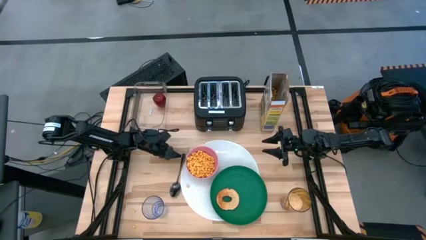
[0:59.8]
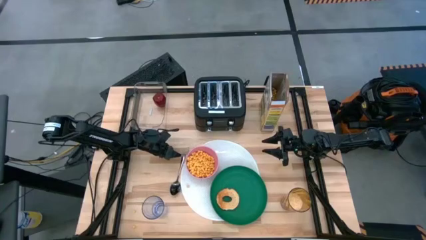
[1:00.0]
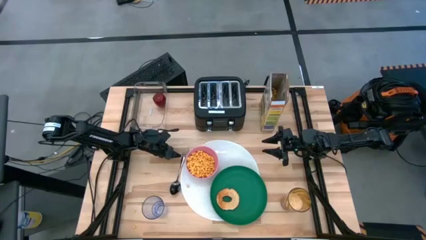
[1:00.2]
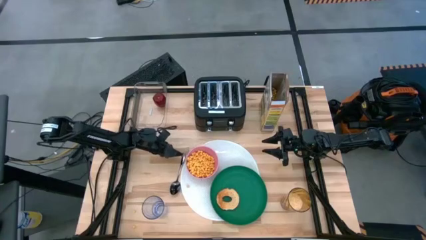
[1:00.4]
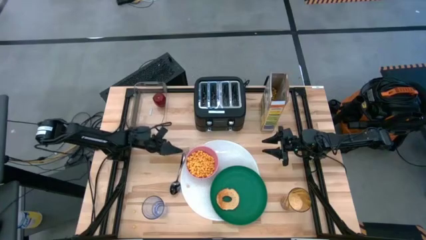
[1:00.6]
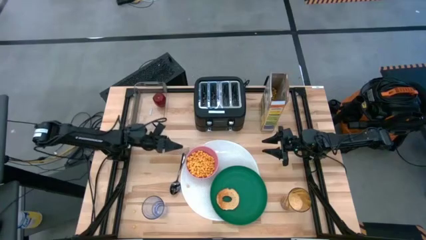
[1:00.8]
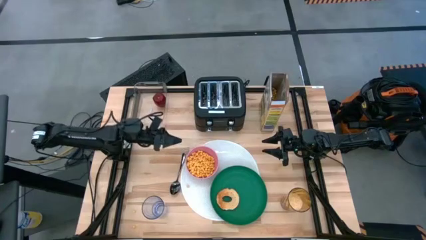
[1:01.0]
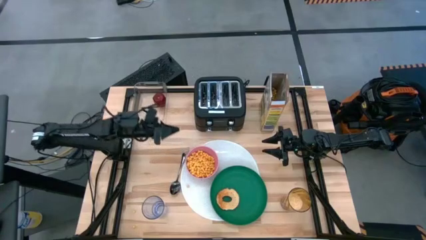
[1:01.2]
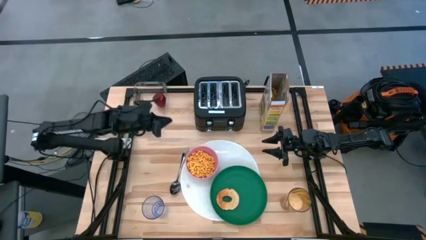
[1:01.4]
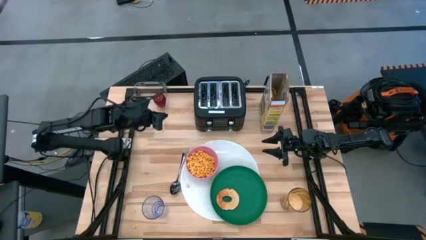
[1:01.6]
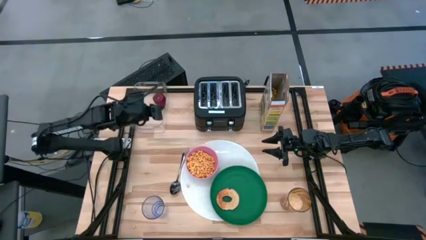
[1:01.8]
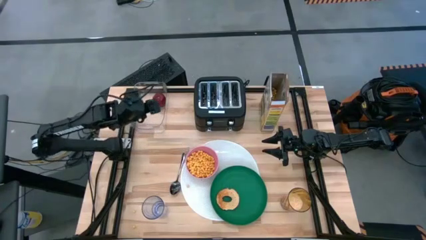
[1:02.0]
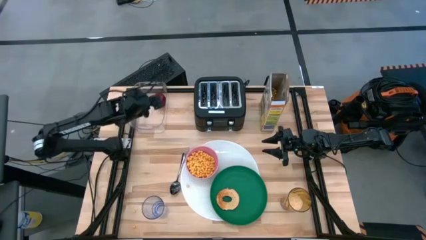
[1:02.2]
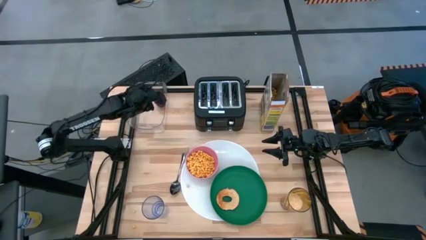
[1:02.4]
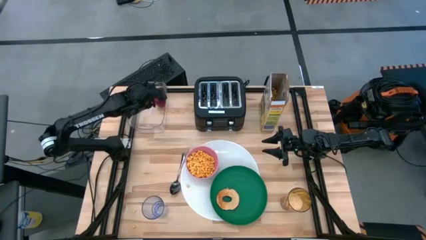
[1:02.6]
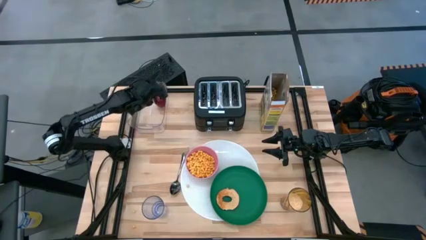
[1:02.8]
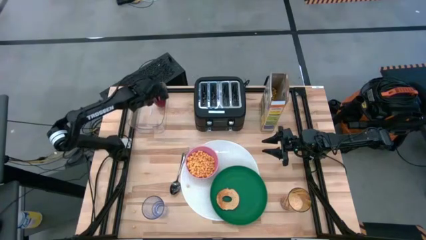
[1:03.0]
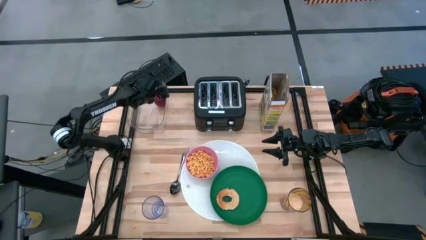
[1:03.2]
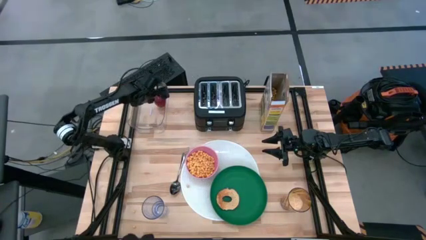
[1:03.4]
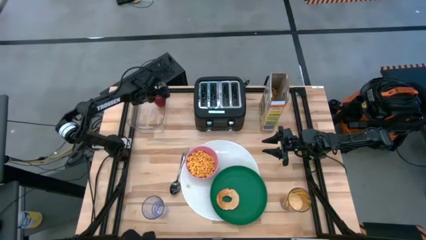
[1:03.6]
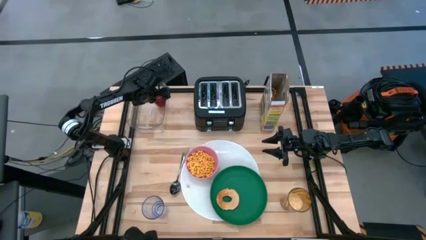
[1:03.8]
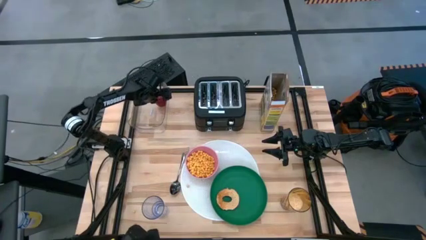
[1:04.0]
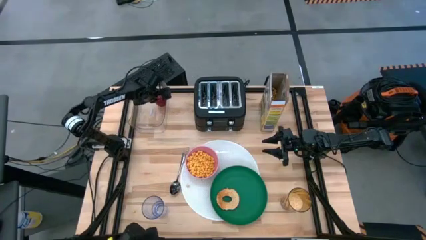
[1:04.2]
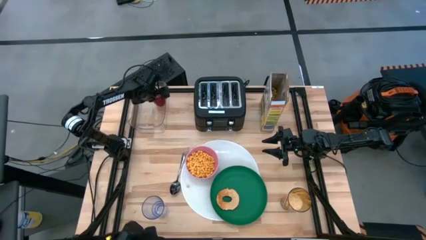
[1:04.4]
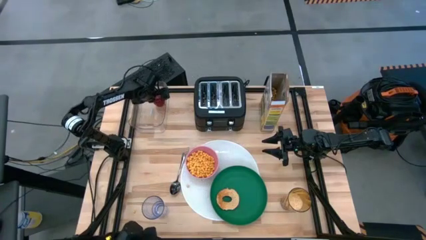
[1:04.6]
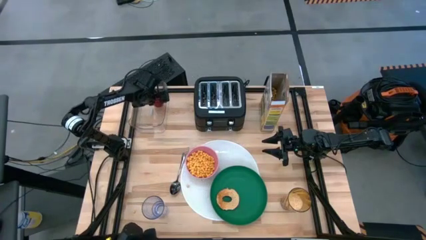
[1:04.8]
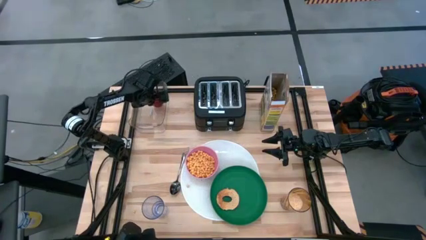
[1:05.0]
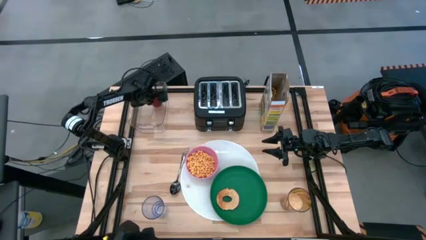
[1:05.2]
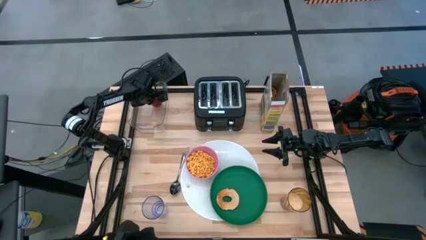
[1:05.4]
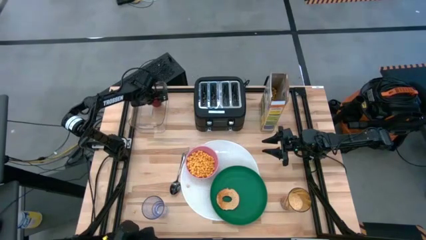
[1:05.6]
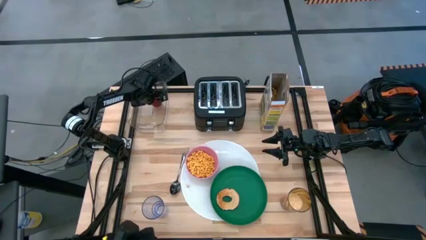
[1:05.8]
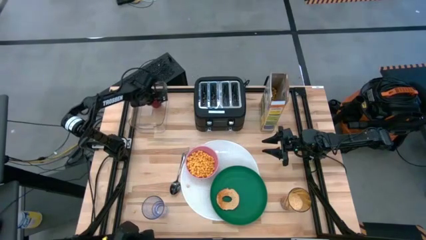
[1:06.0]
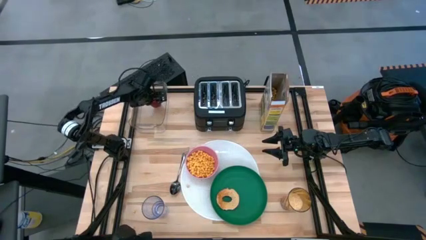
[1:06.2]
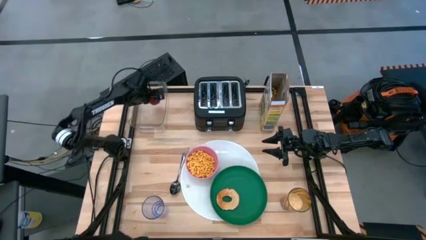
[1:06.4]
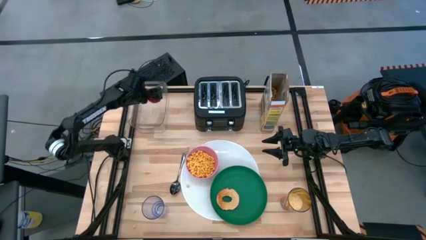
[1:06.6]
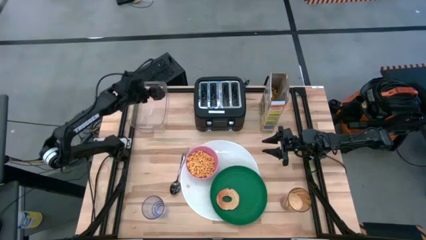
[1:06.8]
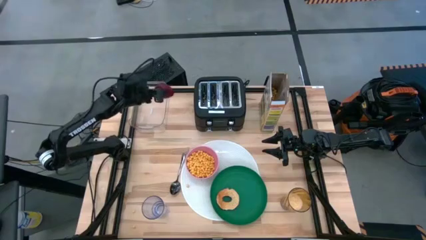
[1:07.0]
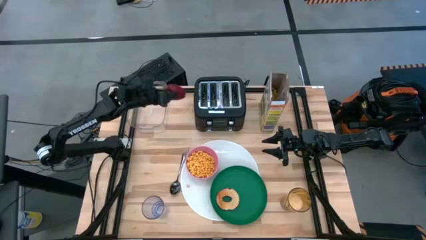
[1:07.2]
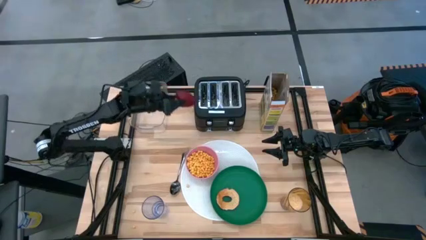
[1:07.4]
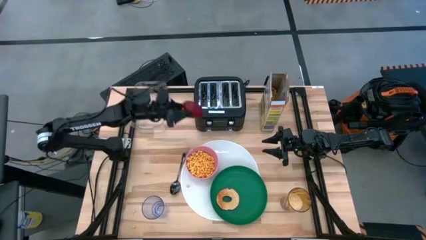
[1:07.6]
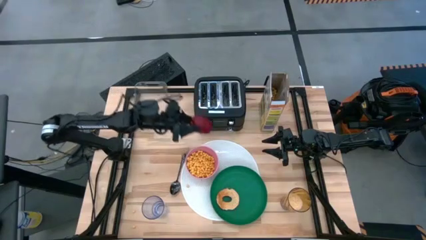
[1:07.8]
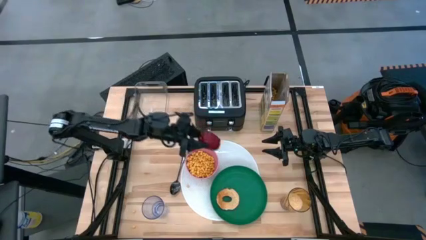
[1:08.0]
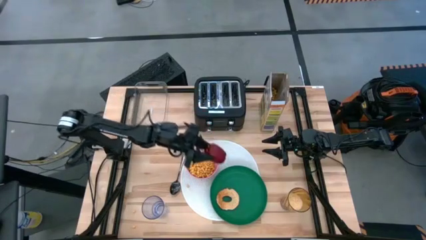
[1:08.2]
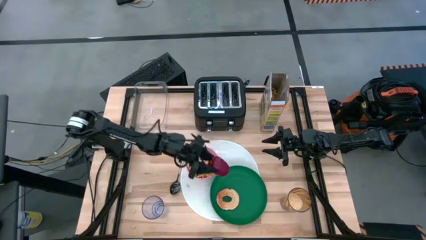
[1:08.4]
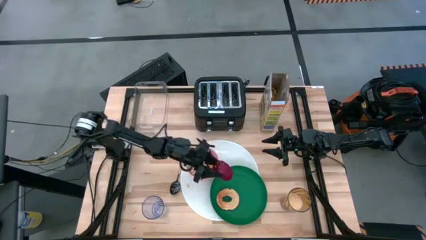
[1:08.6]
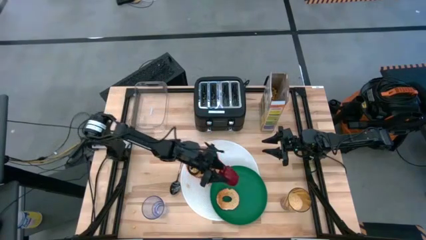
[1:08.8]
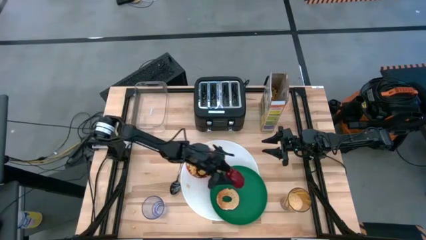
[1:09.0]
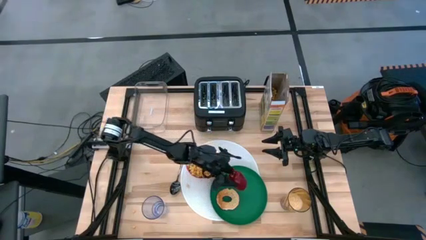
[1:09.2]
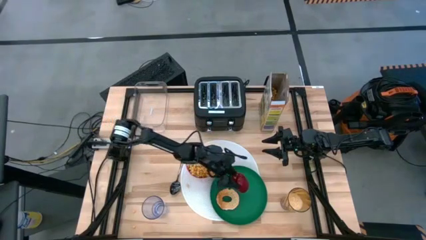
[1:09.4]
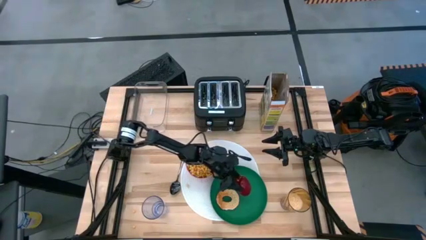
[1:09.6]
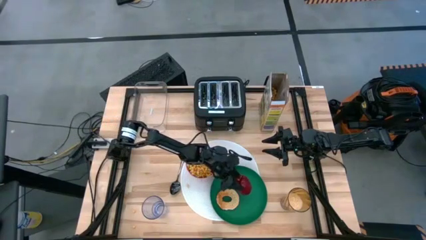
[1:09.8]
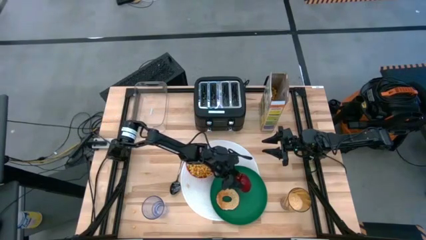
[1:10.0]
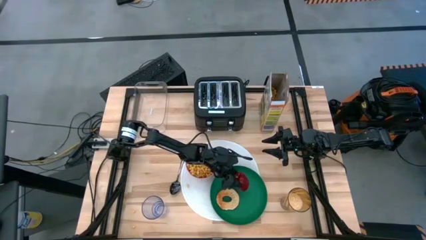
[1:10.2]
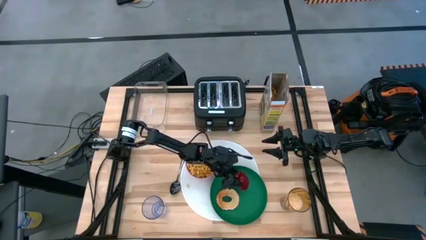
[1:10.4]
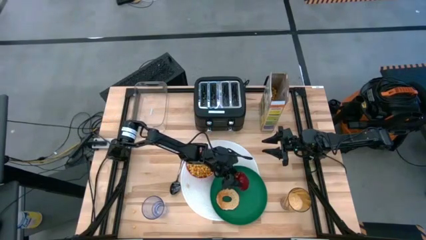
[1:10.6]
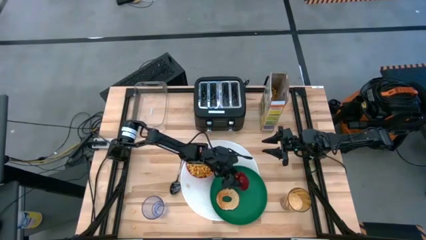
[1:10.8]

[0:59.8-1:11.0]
Task: Arrange a breakfast setting
Put the apple on the green plate on the top right of the toasted bread

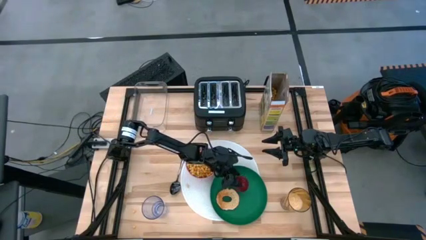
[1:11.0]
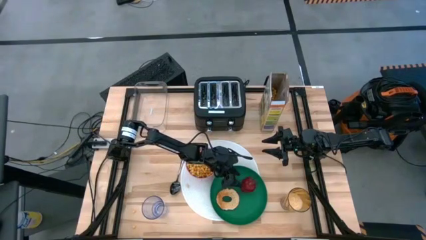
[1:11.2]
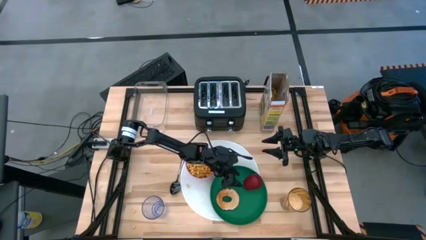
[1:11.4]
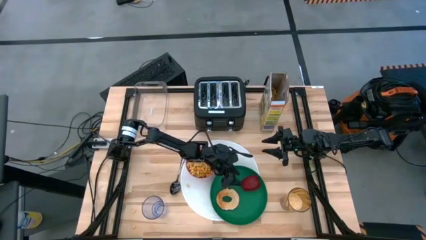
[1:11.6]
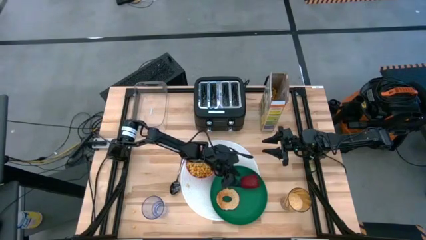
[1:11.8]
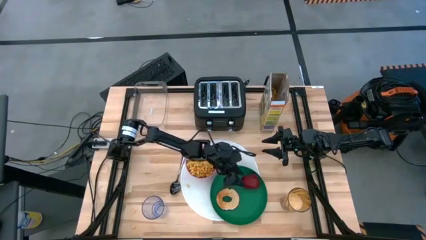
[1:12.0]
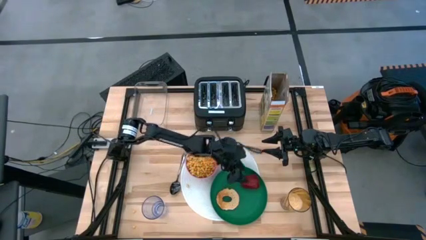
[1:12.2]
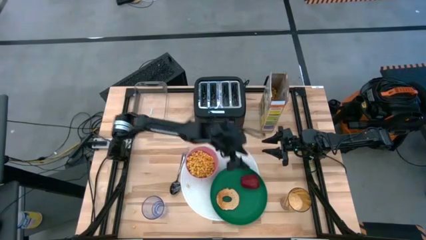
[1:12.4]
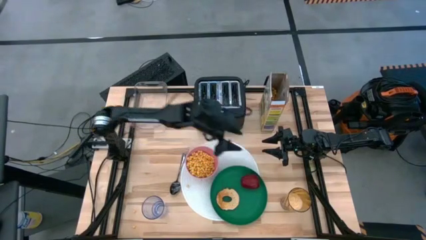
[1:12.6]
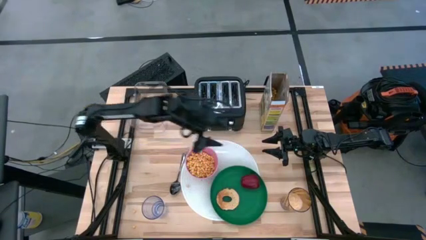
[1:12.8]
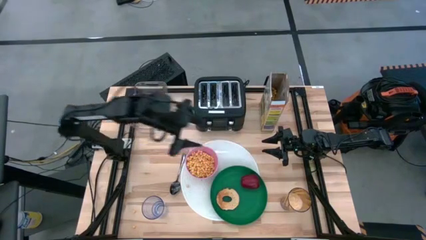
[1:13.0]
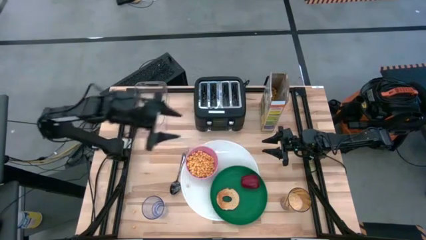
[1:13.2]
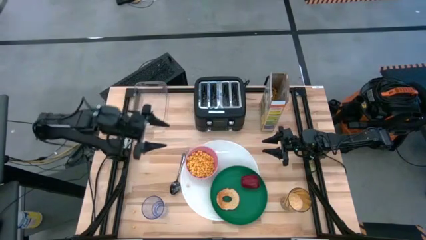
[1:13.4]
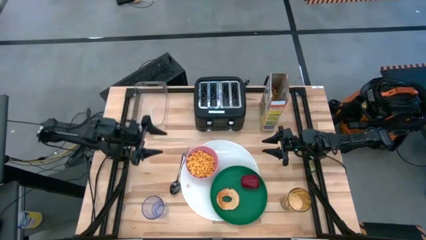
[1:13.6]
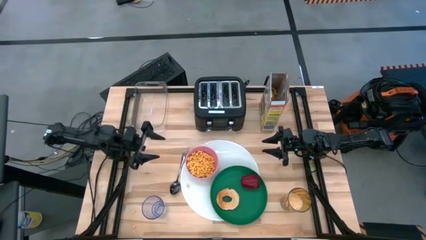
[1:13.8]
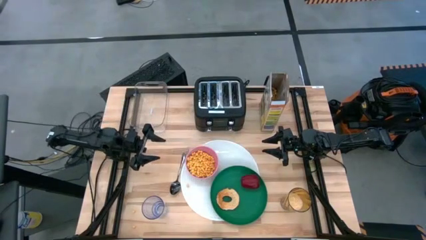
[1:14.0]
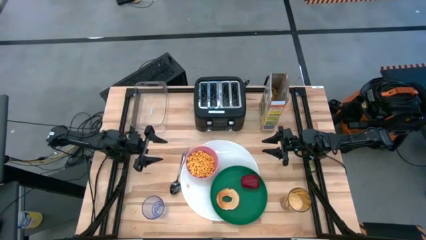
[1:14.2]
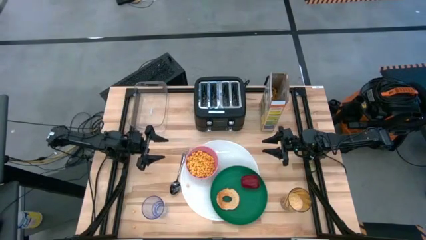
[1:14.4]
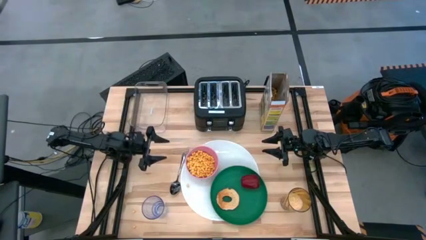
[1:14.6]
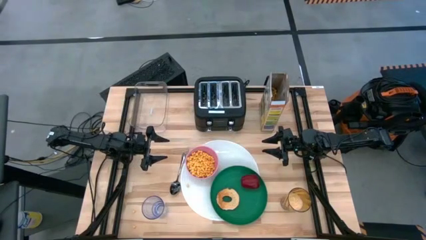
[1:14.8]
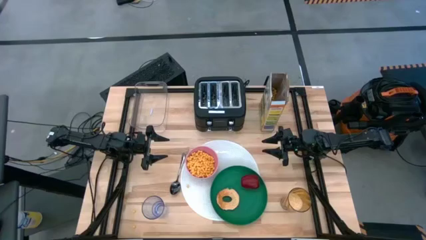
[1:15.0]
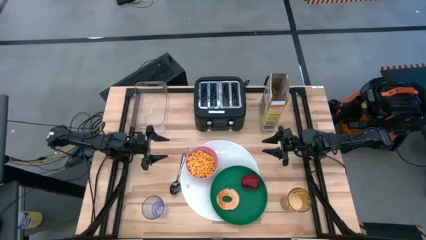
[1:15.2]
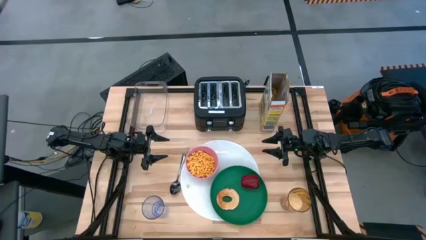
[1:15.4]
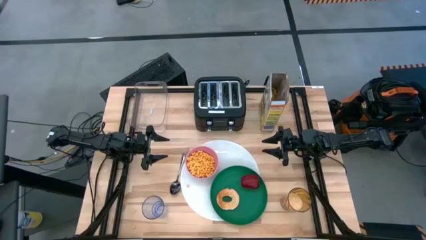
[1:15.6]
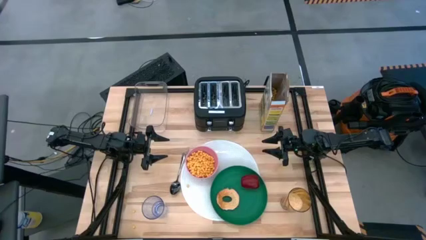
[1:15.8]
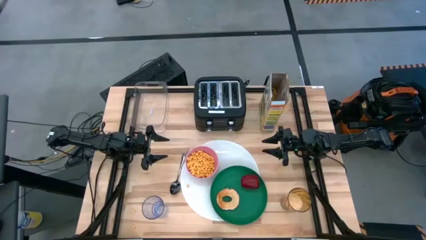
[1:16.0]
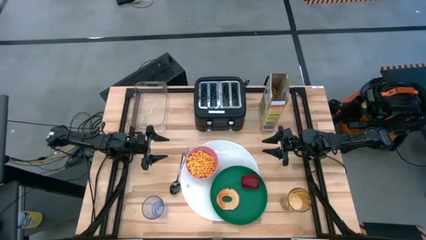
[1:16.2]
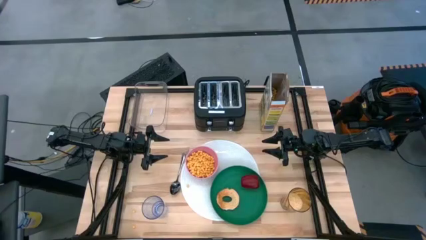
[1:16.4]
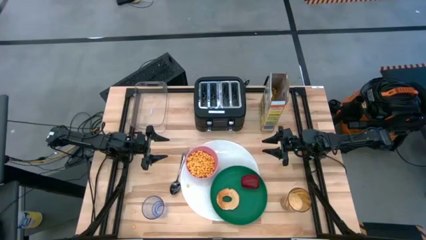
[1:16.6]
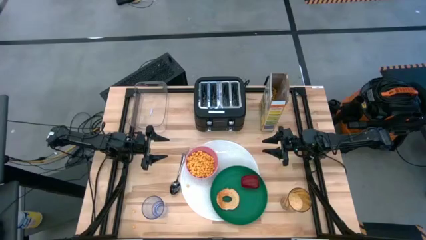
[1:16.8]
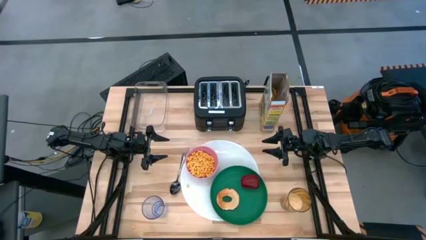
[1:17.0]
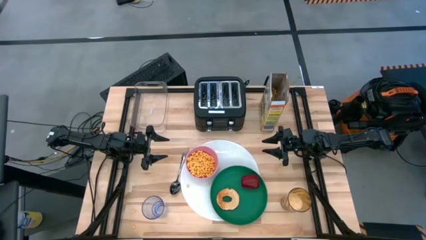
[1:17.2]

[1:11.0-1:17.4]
Return to Home Position
